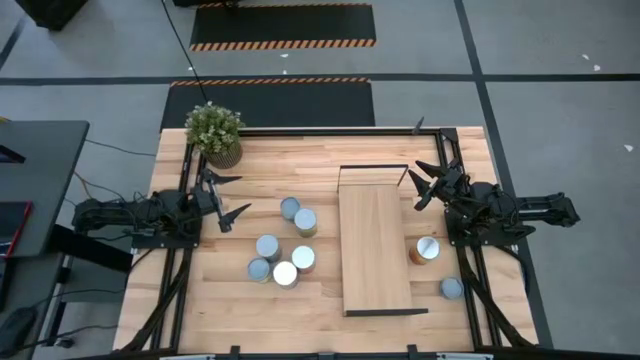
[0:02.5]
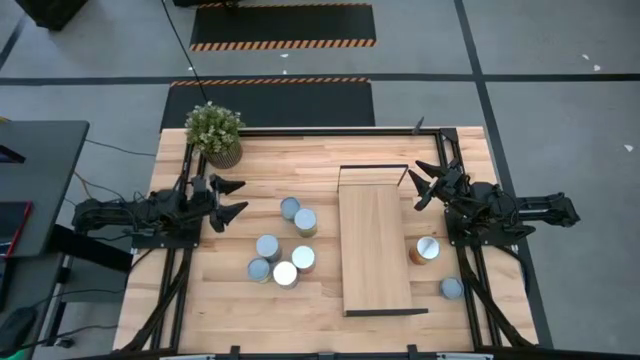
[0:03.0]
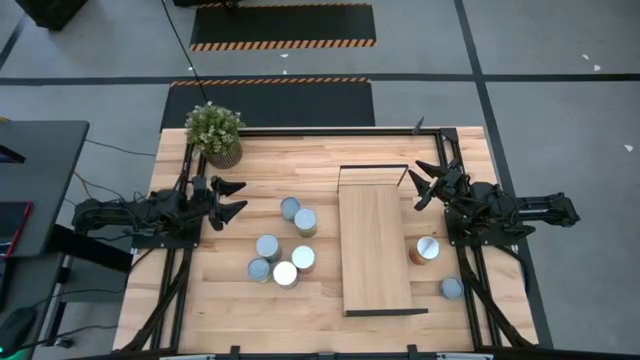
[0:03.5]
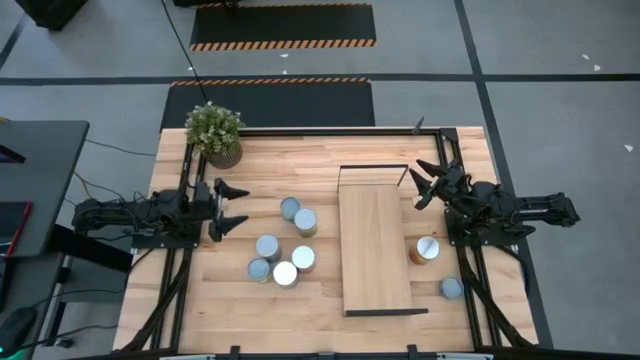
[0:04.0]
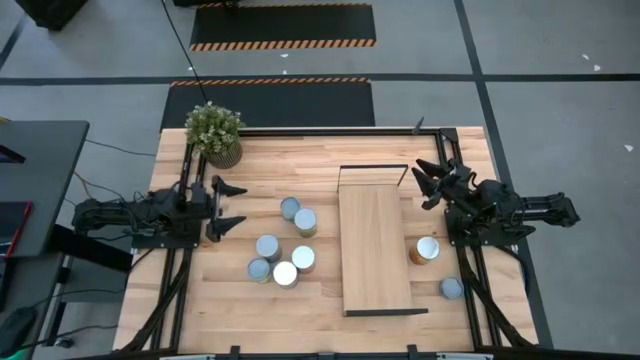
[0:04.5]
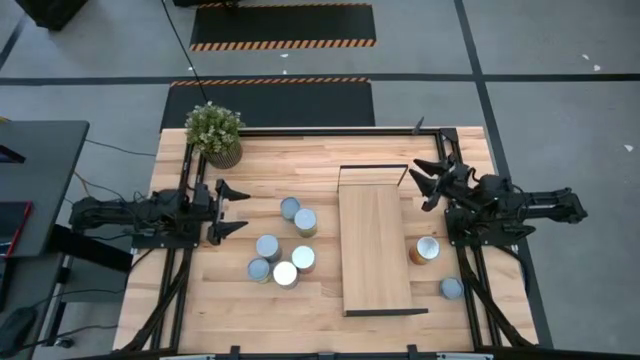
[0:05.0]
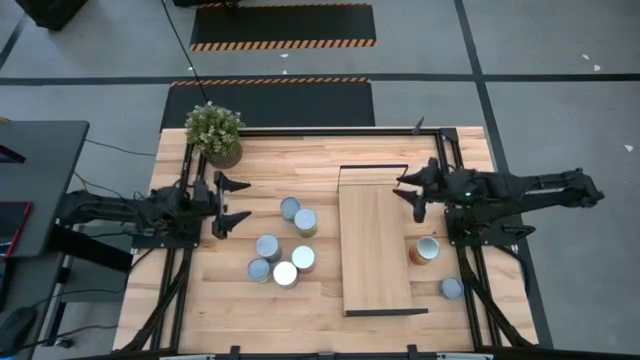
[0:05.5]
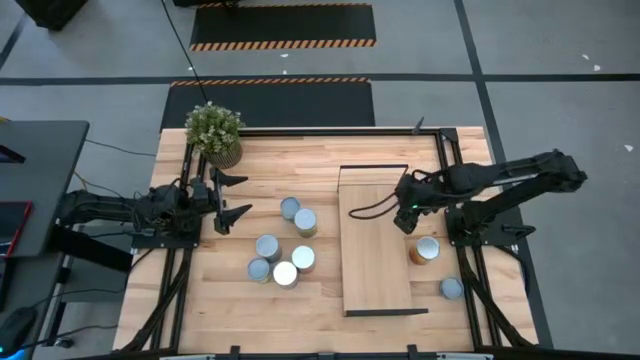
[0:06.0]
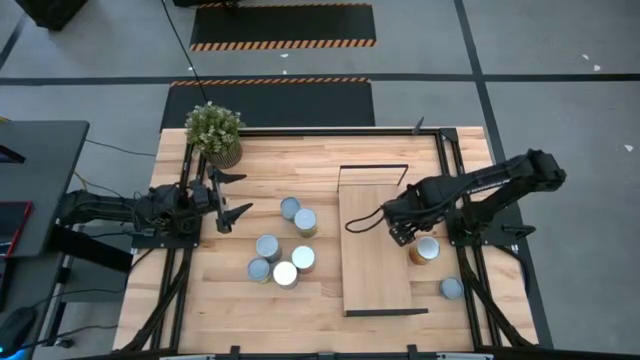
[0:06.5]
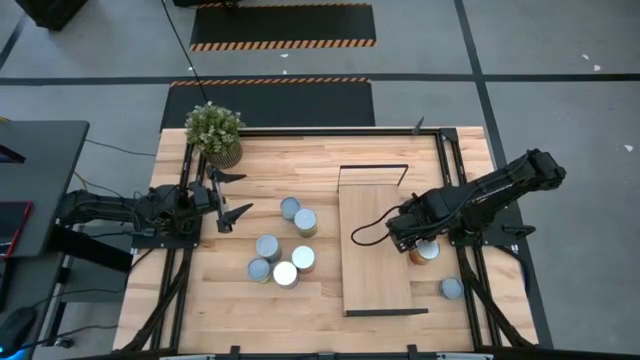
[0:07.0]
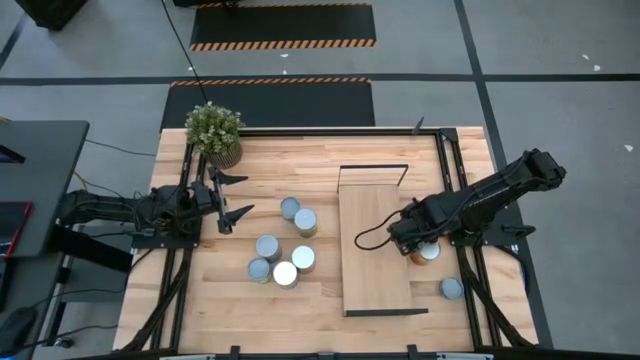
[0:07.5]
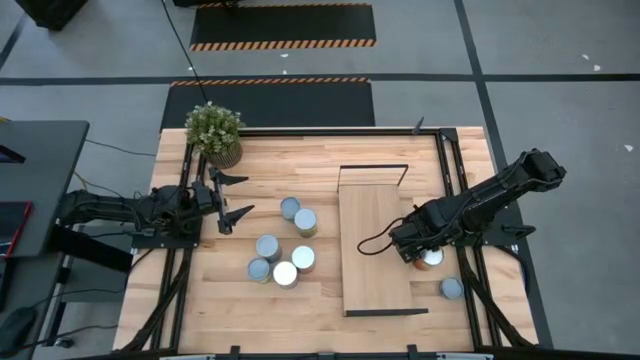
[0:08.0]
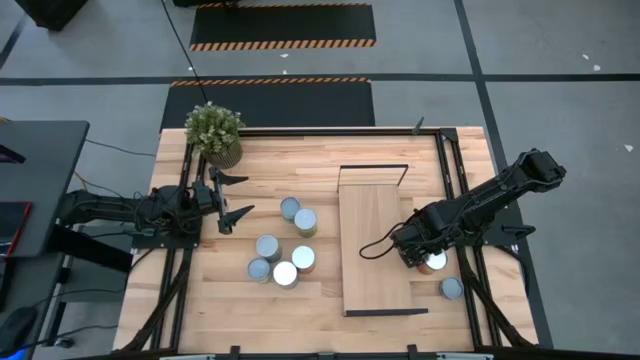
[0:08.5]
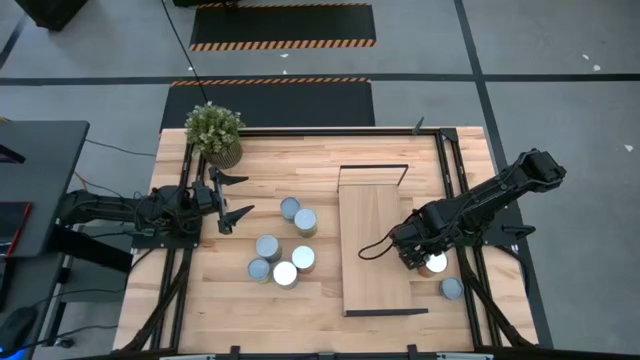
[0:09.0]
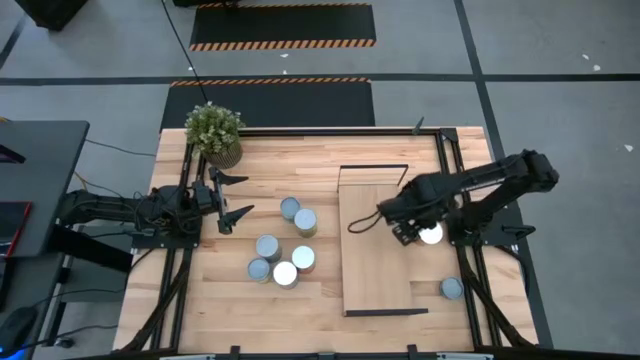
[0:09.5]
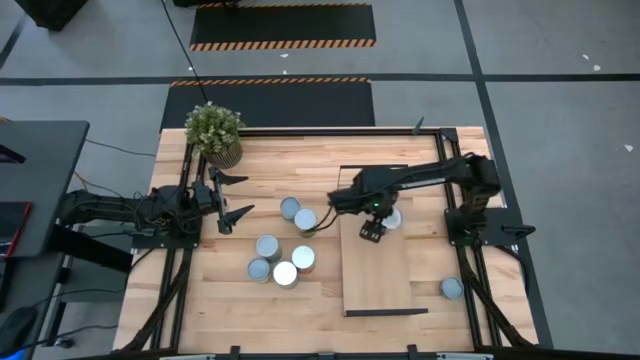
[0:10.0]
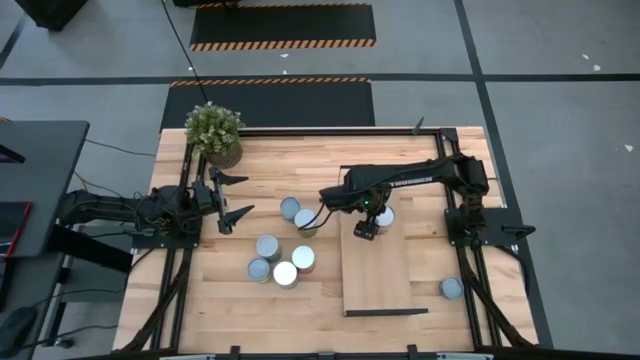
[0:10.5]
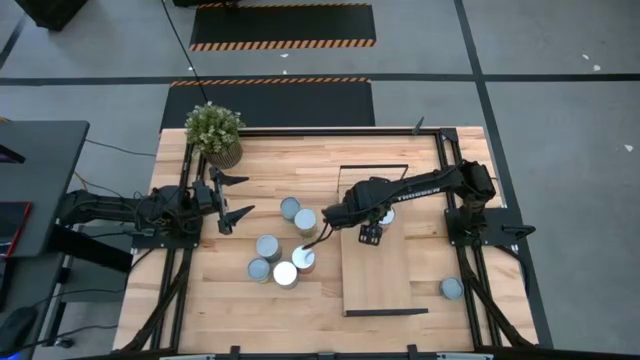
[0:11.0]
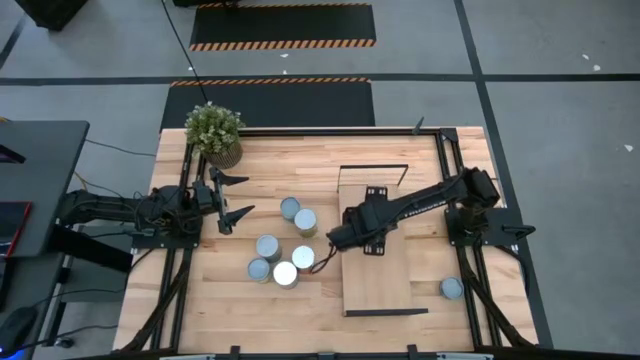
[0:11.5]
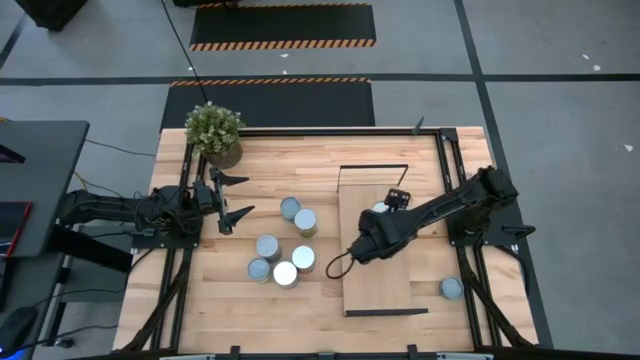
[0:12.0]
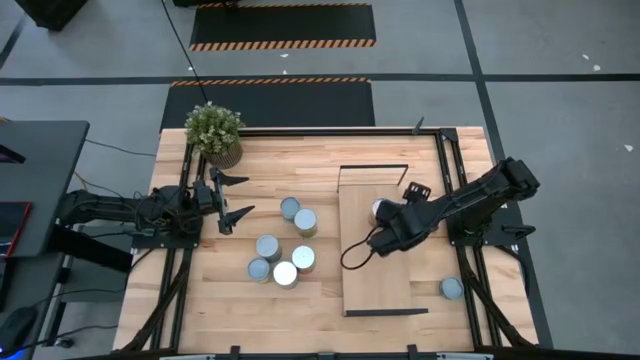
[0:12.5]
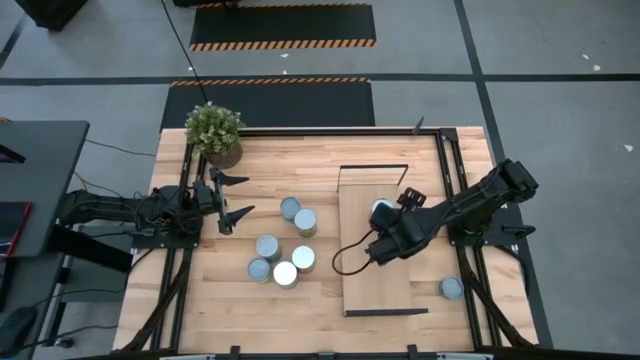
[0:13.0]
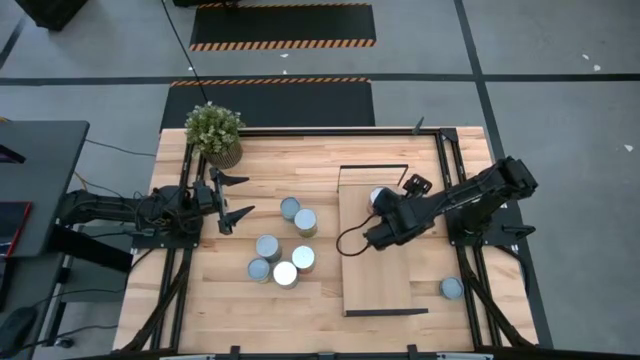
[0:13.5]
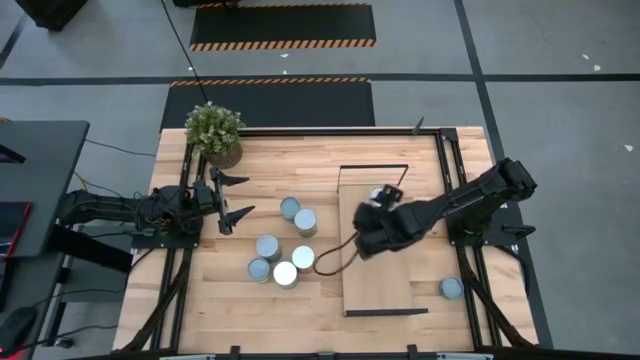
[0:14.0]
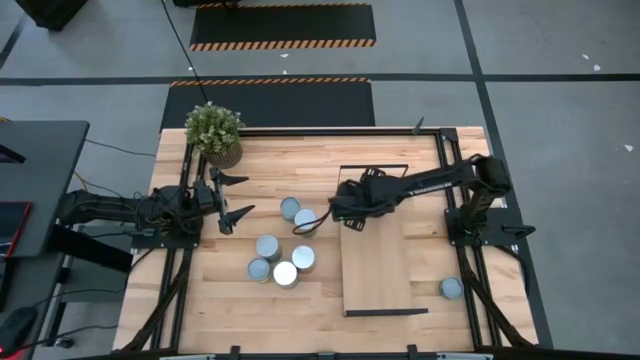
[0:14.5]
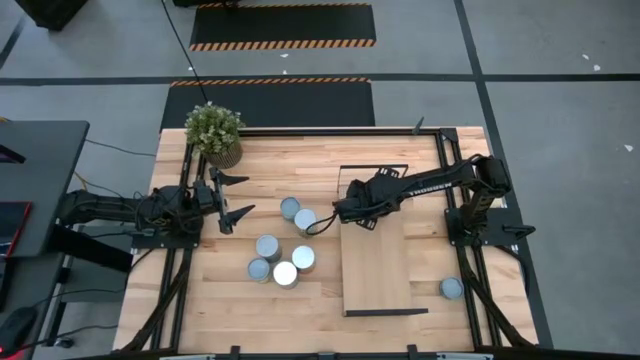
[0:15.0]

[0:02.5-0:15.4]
Task: Pick and place cans onto a shelf
Put the canned corn can on the shelf

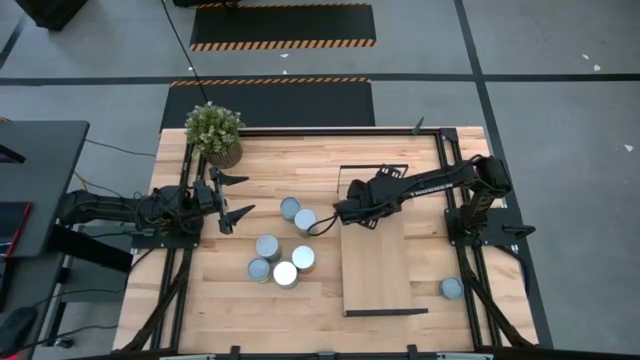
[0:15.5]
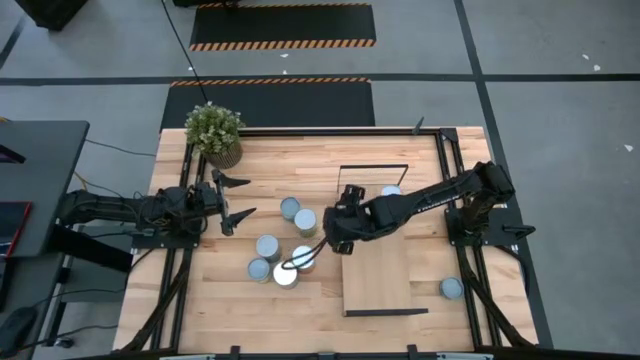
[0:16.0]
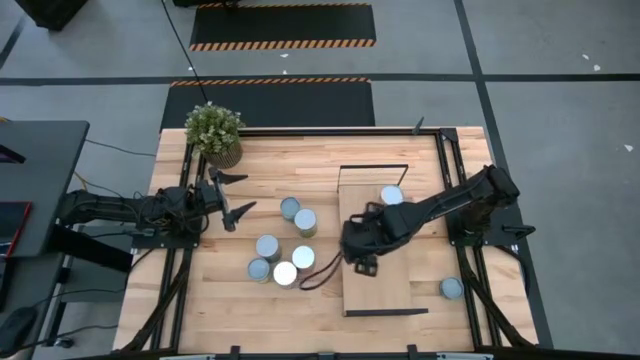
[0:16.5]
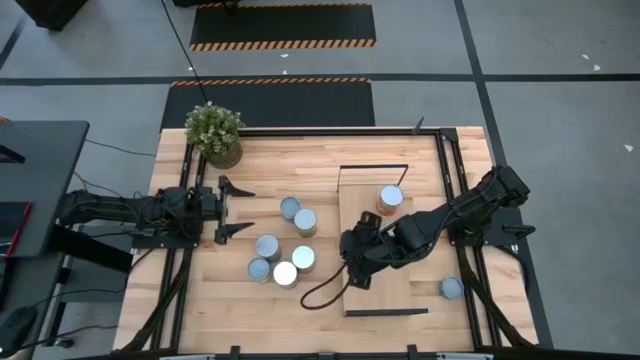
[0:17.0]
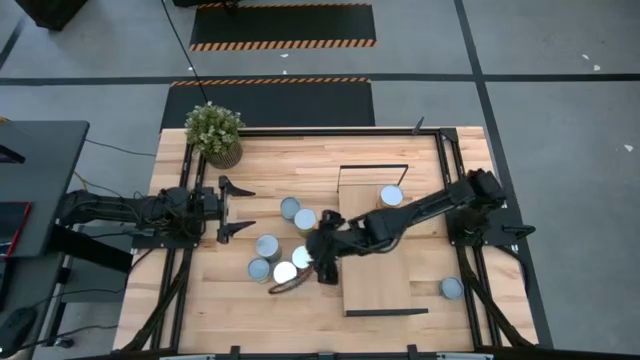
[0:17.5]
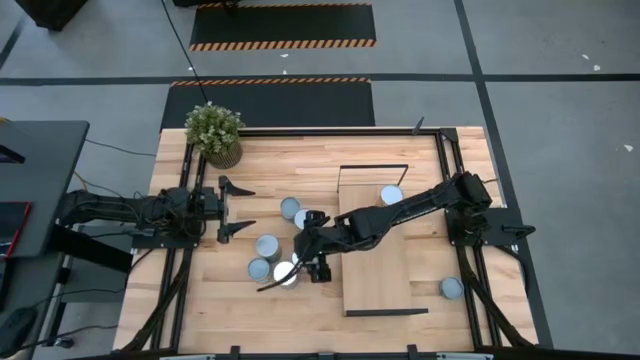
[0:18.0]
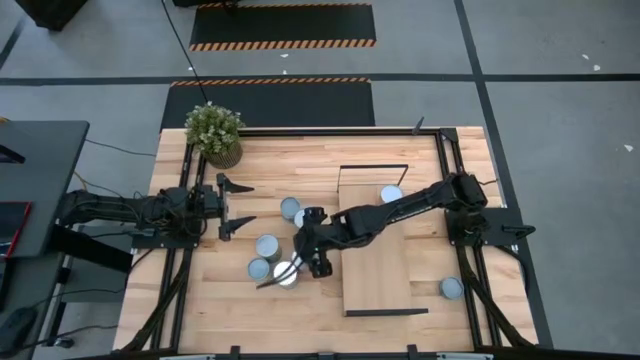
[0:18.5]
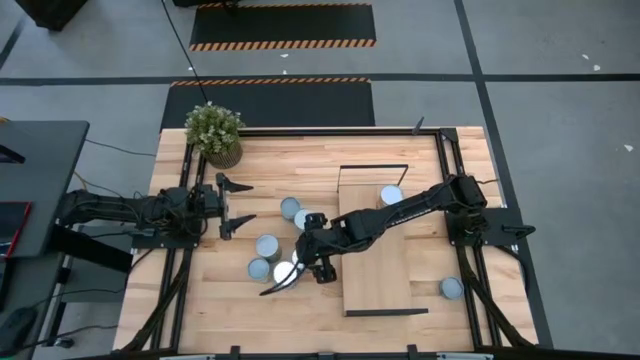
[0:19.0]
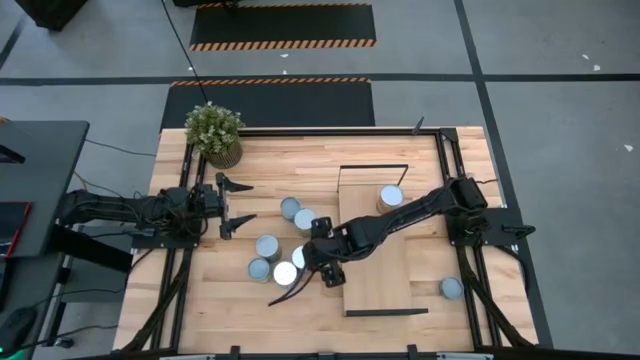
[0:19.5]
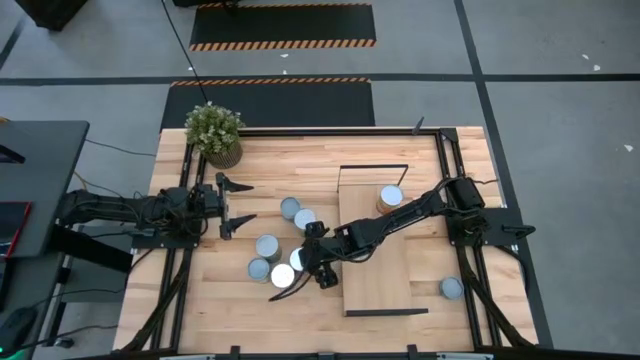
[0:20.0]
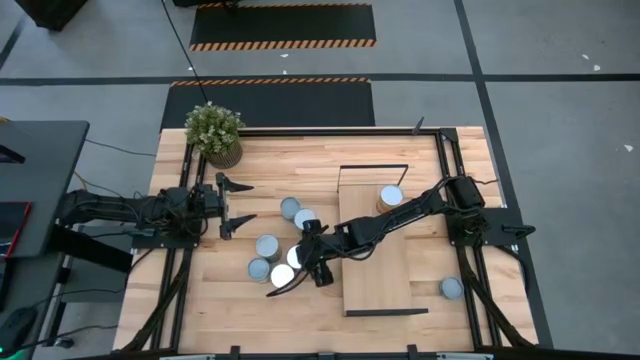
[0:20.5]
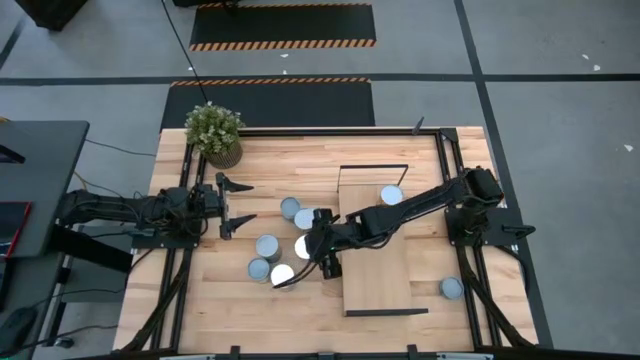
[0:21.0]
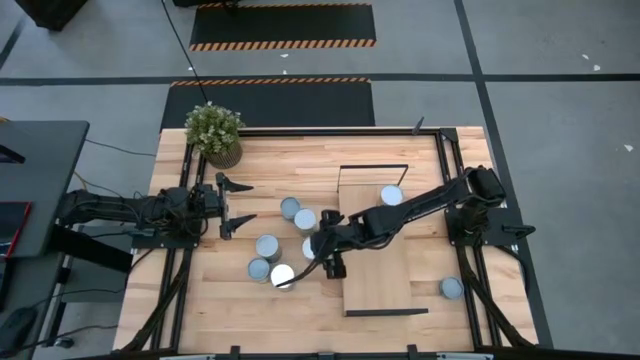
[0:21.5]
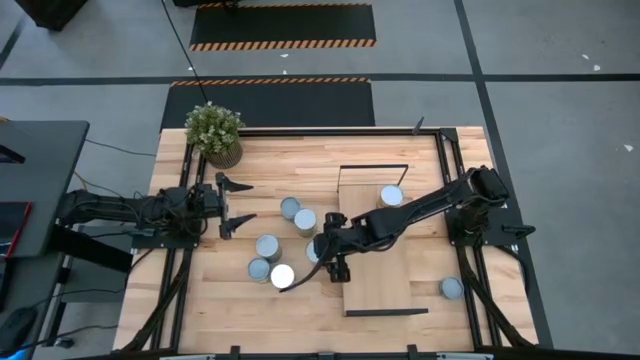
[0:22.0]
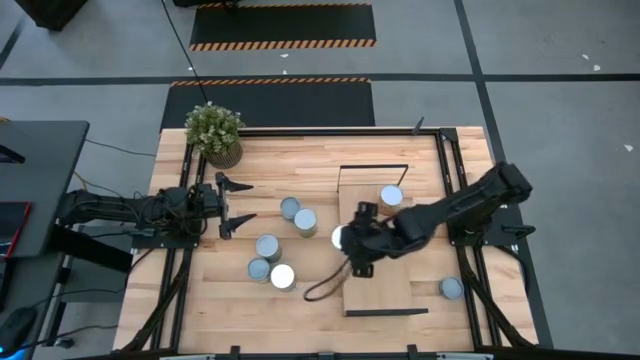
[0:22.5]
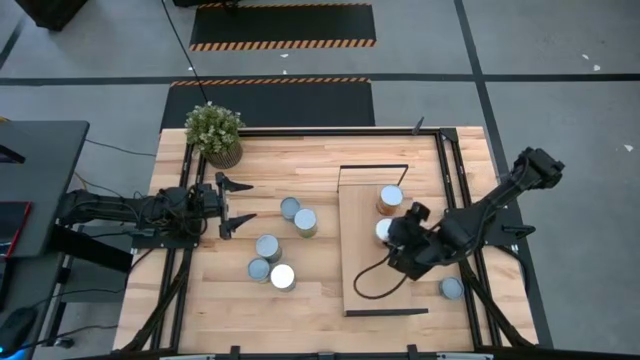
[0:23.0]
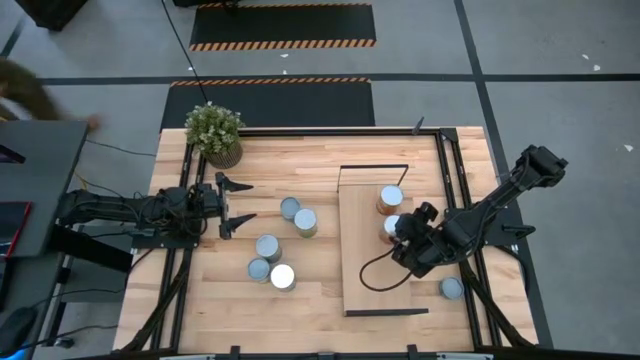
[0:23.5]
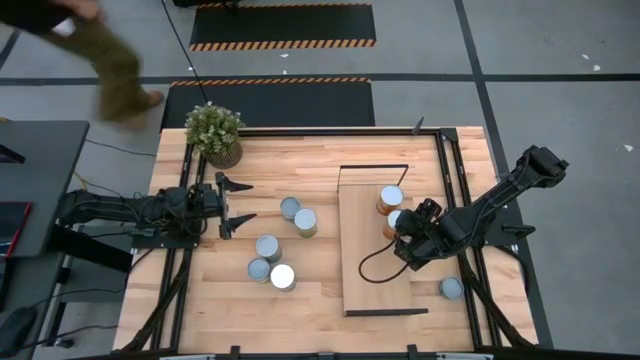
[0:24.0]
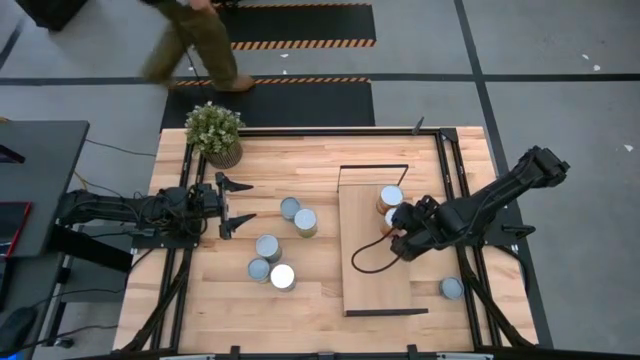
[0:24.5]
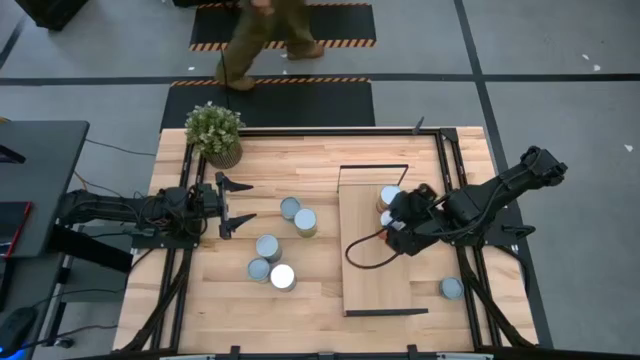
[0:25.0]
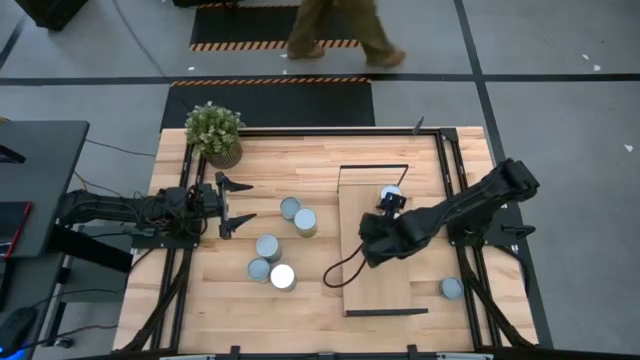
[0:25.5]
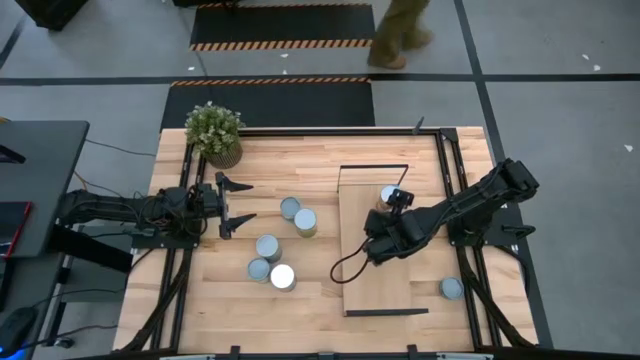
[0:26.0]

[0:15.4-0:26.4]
Put the canned pineapple can on the shelf
